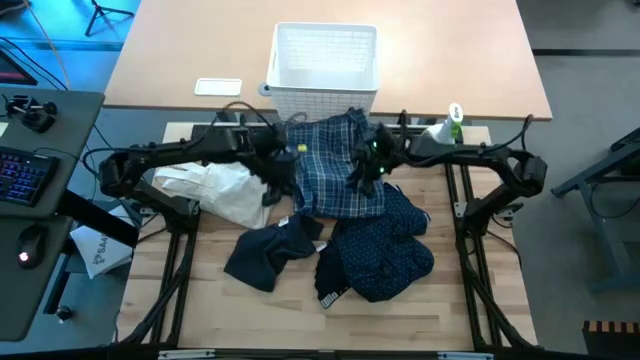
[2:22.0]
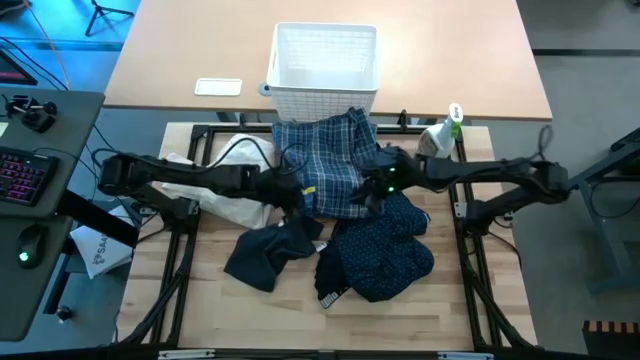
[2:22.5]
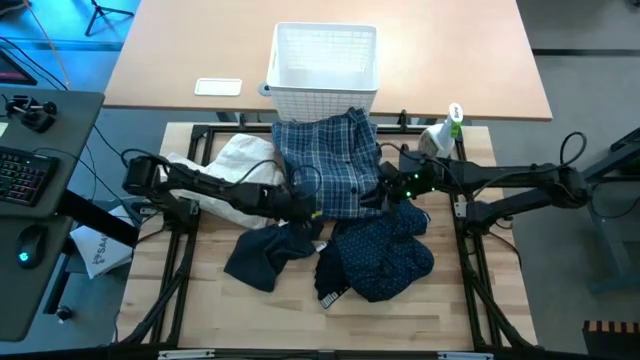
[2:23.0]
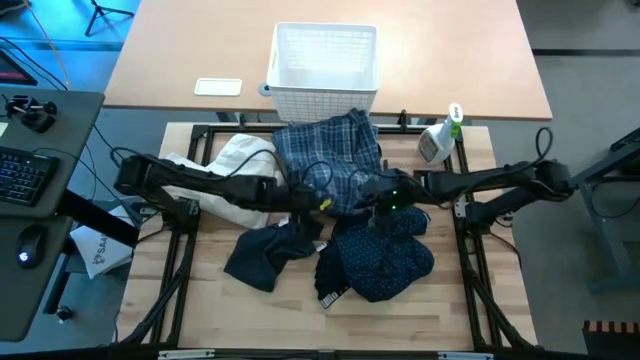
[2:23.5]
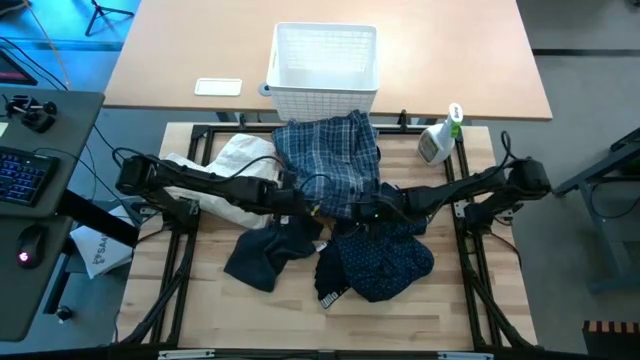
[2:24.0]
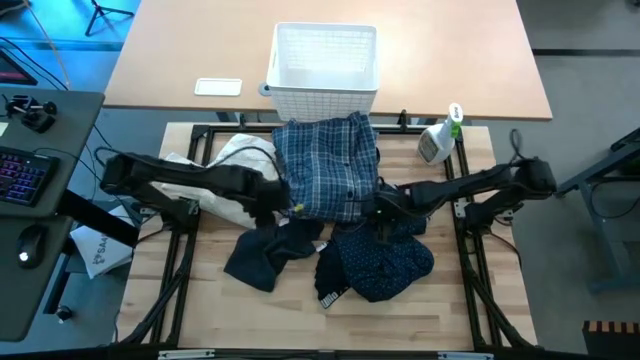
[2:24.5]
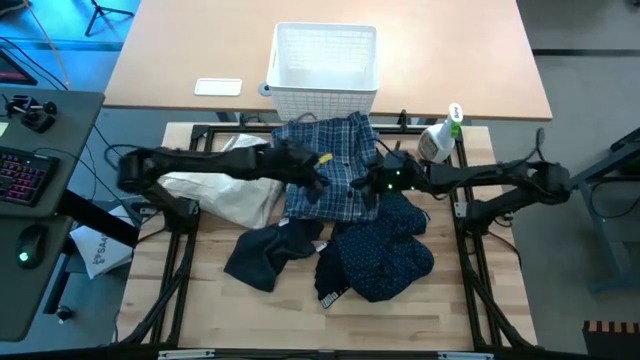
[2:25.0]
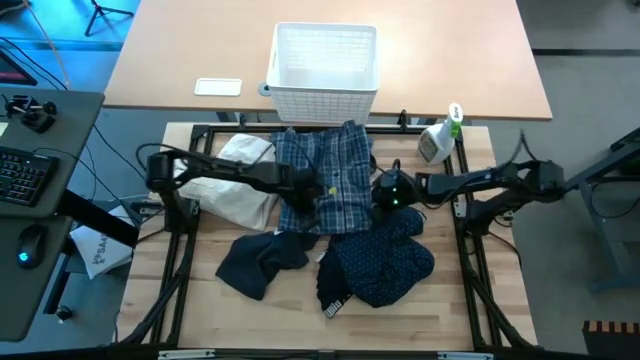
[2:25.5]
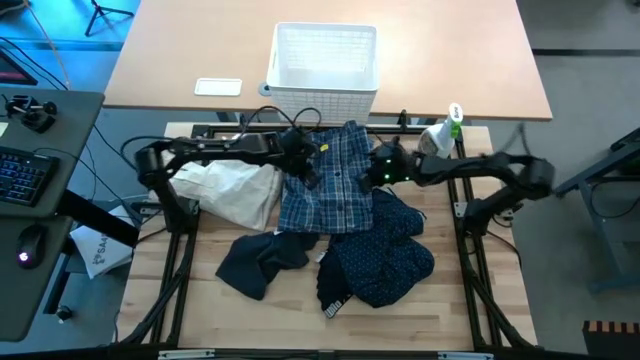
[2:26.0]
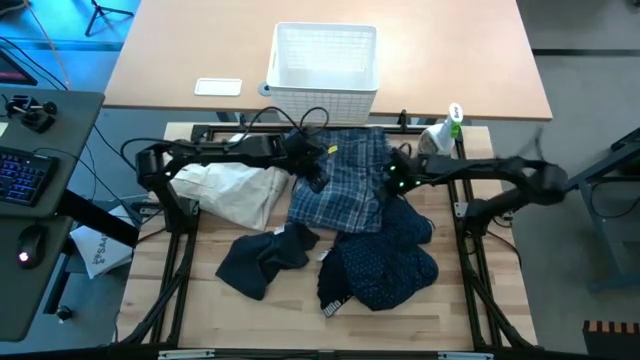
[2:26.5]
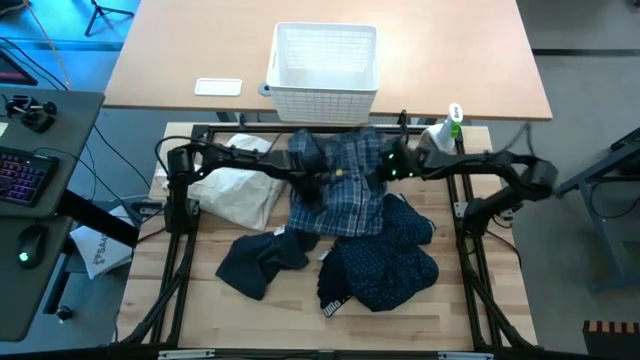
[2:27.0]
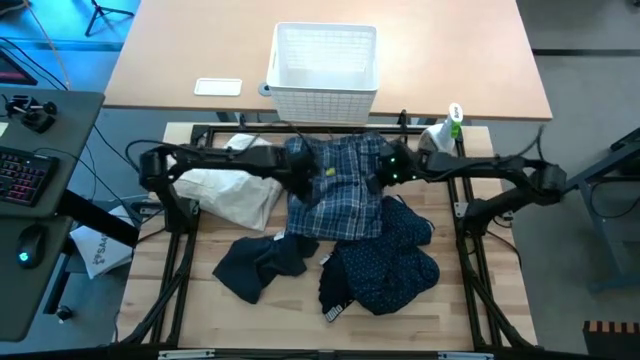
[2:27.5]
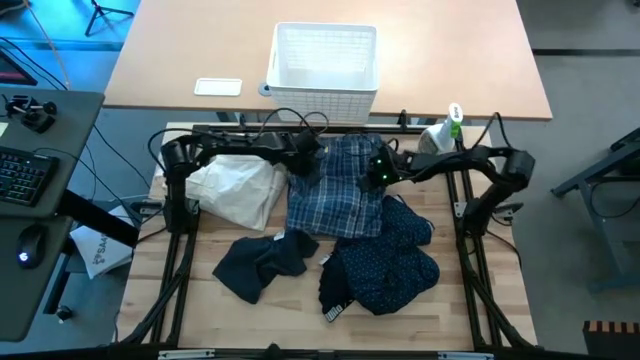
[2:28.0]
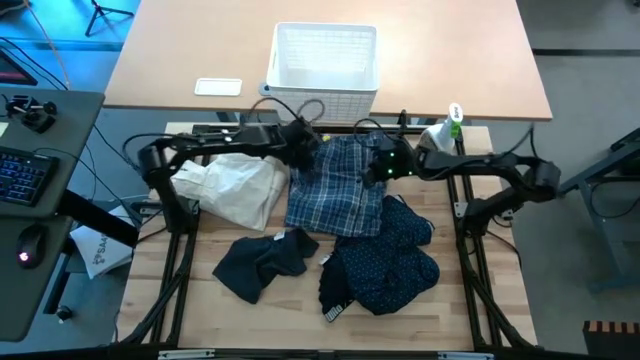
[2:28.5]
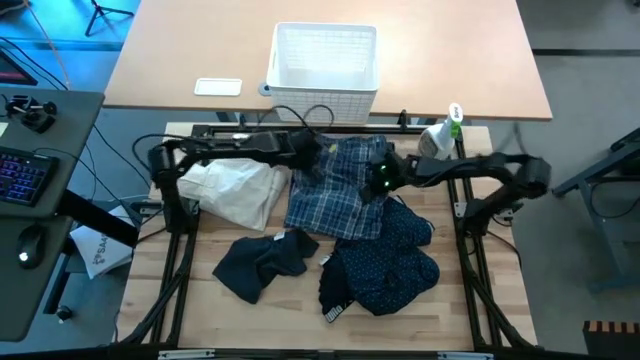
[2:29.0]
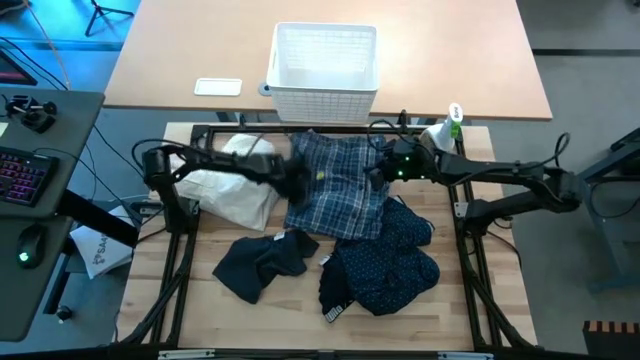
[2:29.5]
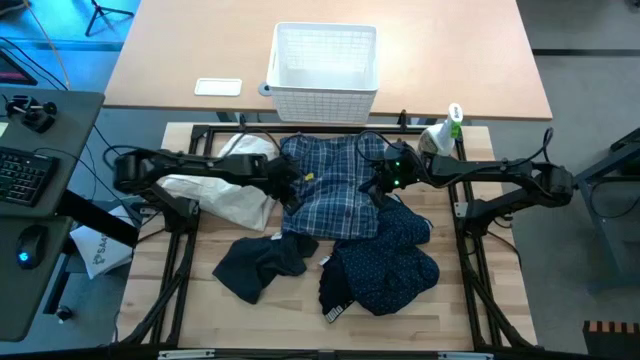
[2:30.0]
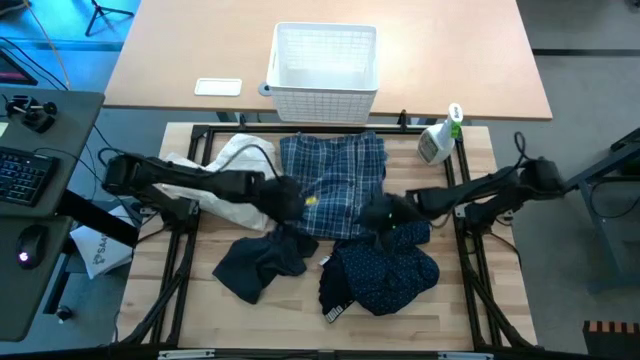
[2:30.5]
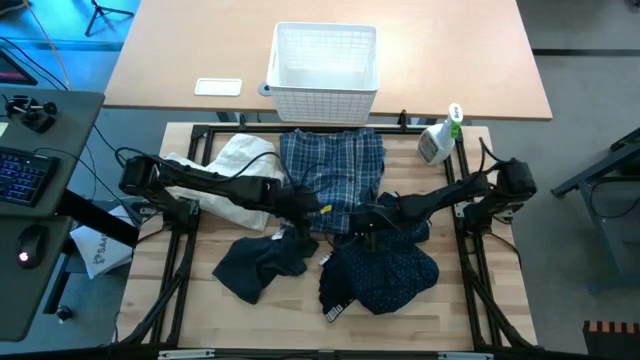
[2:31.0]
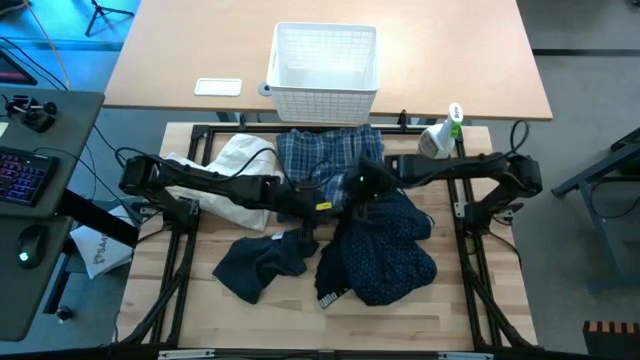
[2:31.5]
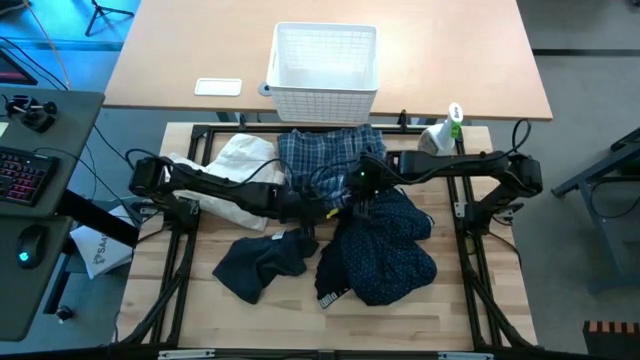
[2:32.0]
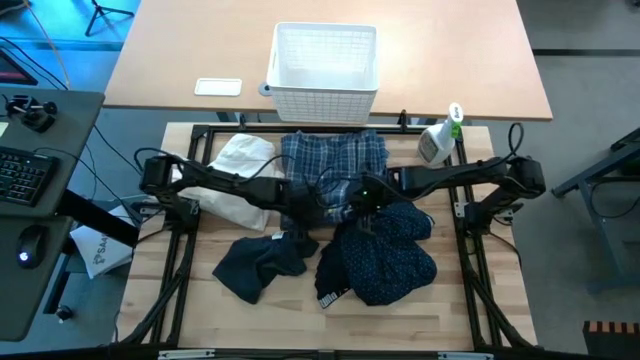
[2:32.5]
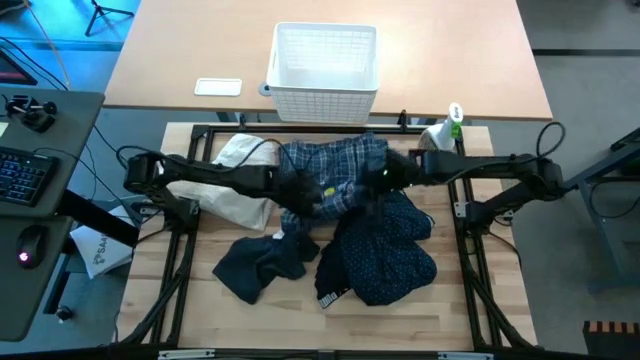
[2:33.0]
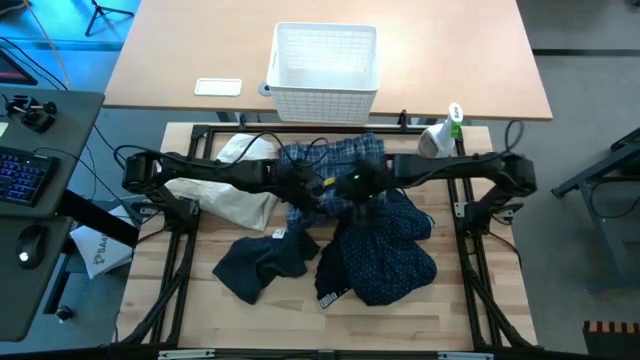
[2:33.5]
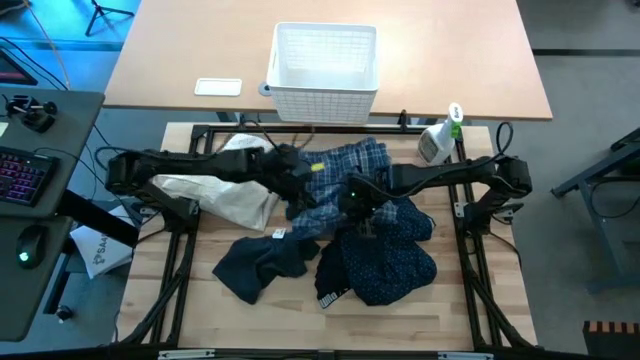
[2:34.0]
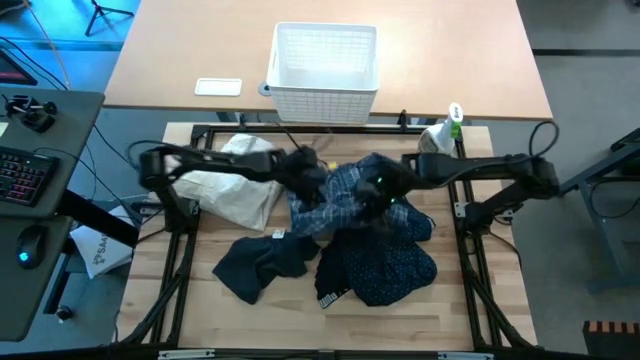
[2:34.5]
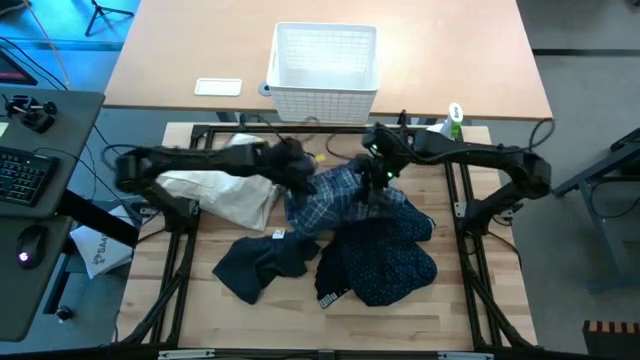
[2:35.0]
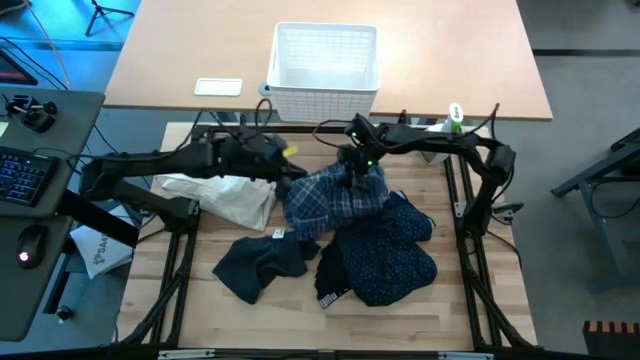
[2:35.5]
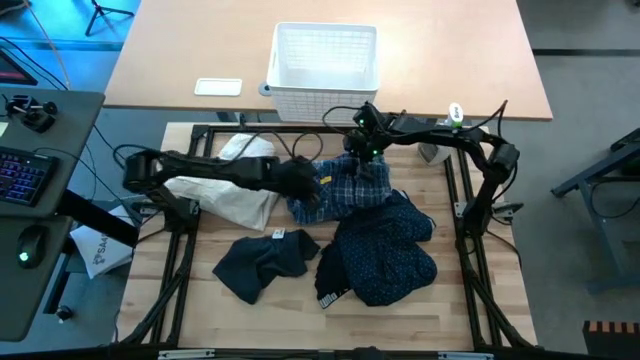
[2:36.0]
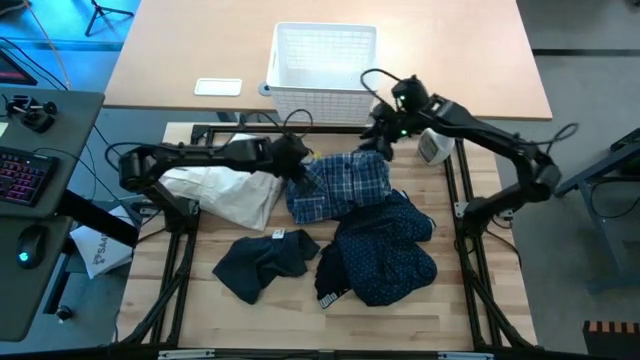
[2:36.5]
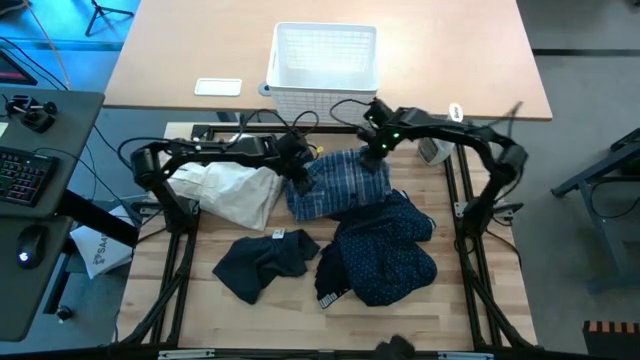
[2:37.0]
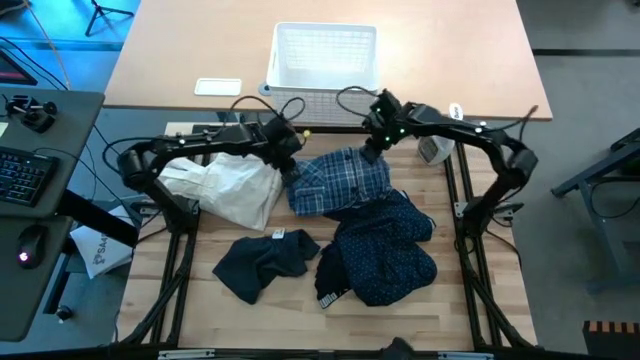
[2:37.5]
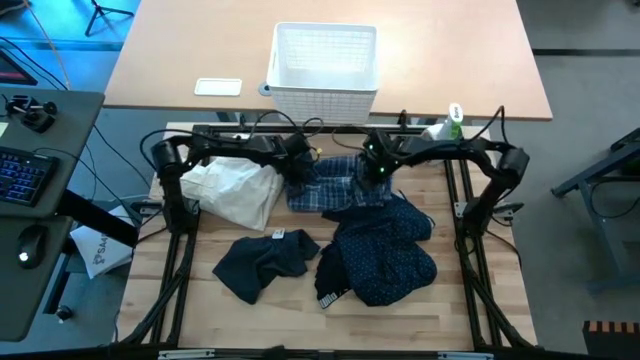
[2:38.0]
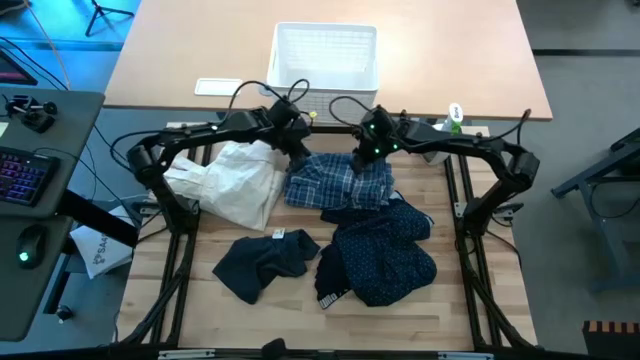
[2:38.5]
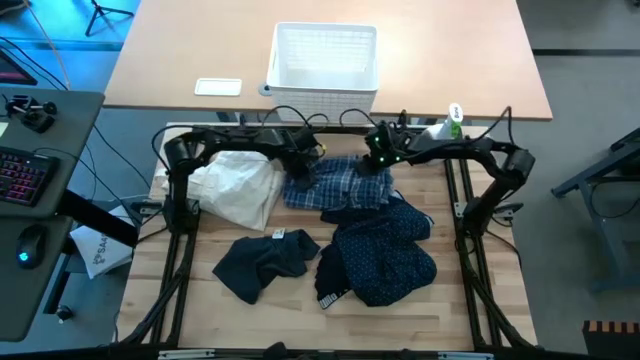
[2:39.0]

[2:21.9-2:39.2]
Task: Fold laundry
Fold the blue plaid flannel shirt

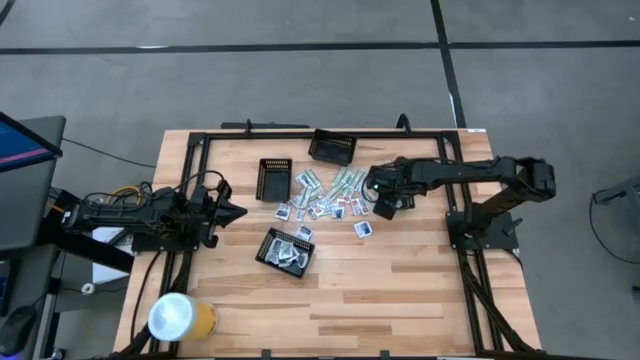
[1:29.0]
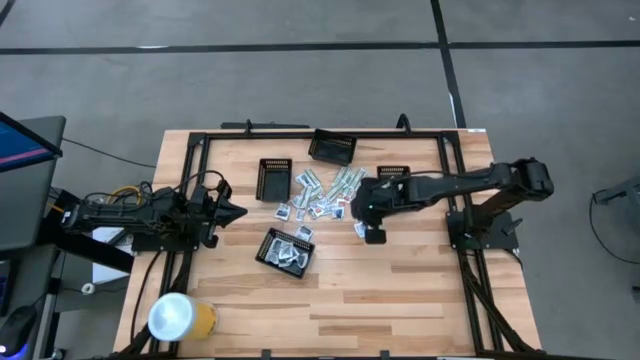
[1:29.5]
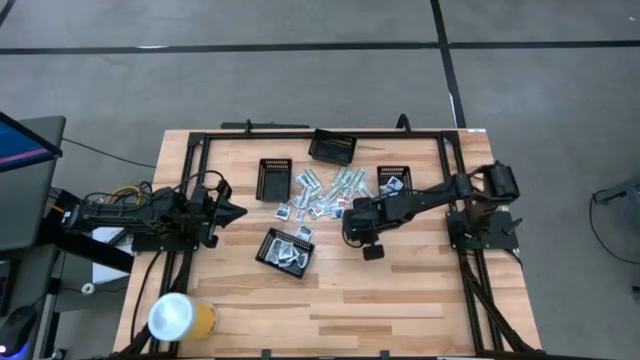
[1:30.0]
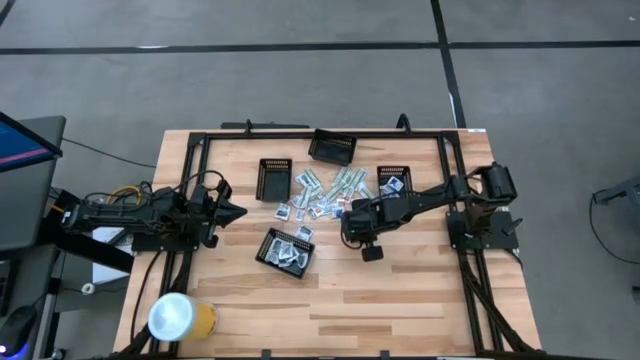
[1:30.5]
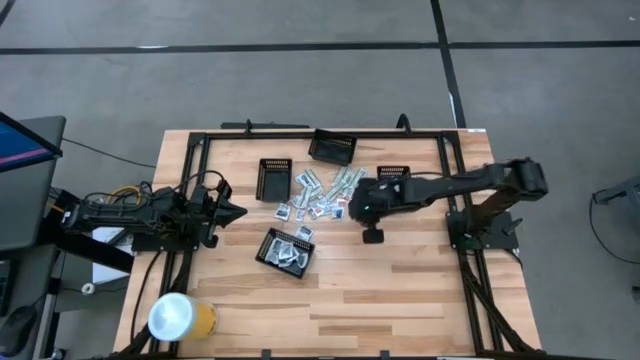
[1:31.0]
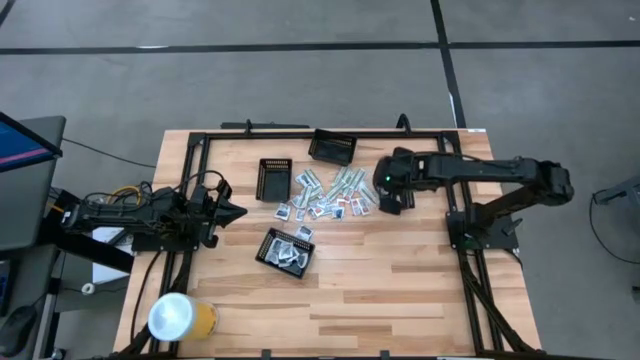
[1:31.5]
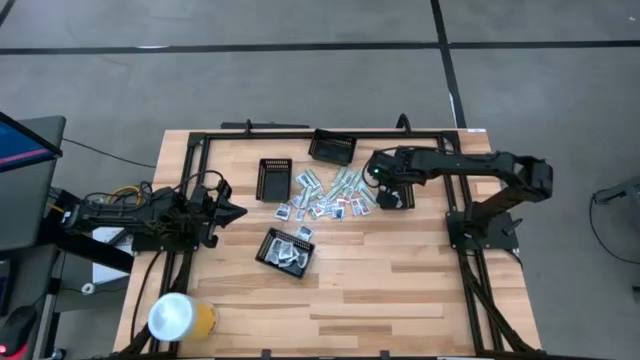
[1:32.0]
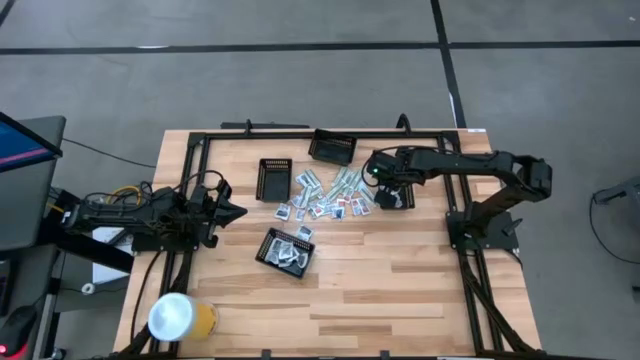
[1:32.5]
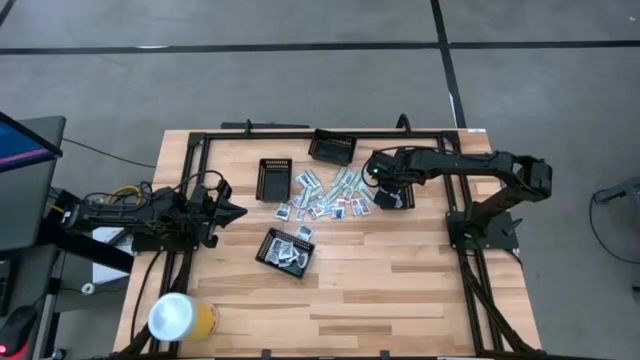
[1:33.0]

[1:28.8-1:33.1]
Task: Pick & Place First Aid Supplies
Put the white alcohol pad into the right black bin
